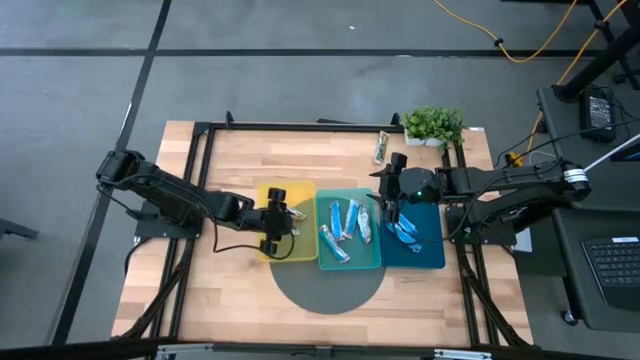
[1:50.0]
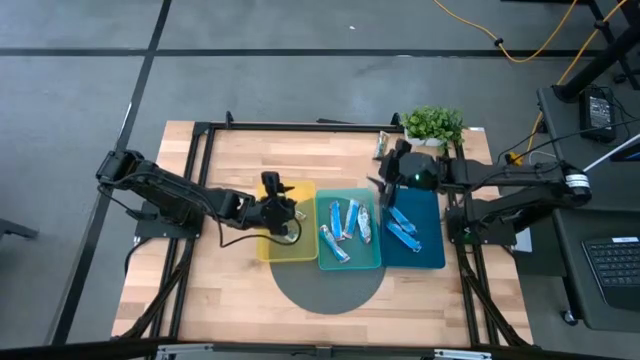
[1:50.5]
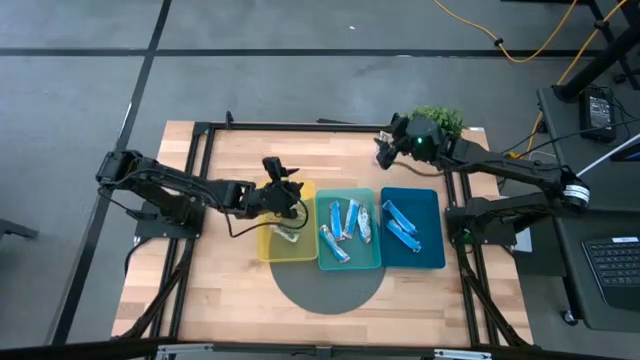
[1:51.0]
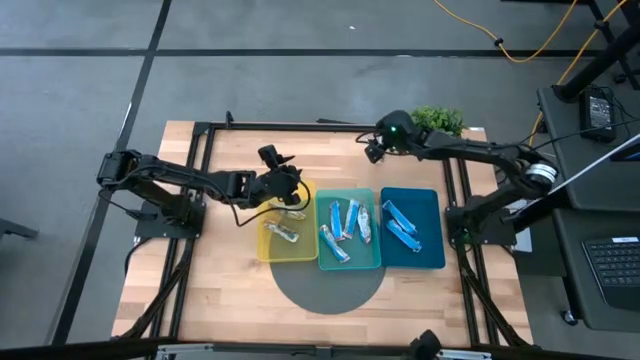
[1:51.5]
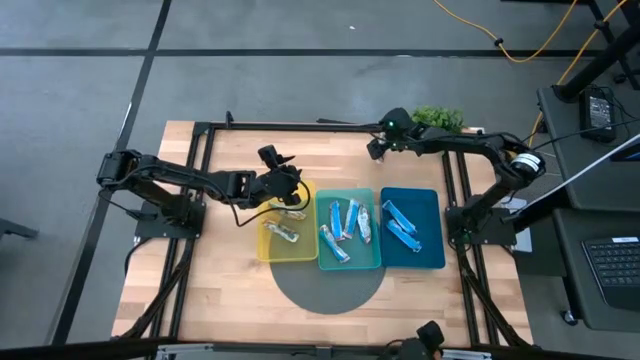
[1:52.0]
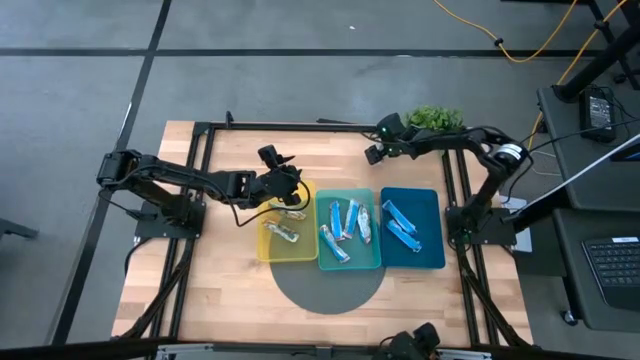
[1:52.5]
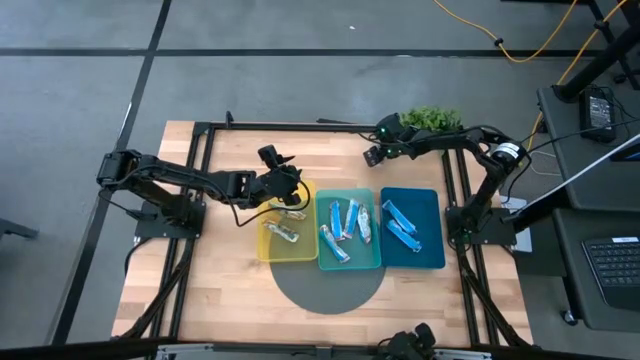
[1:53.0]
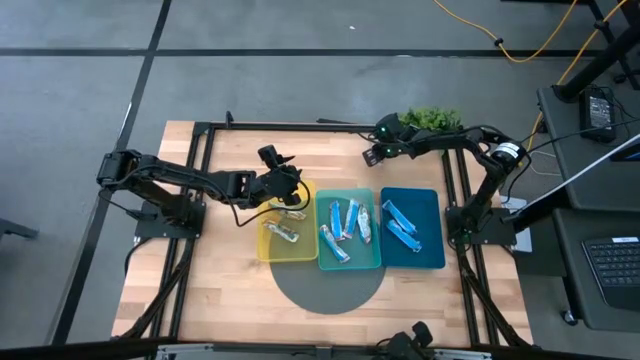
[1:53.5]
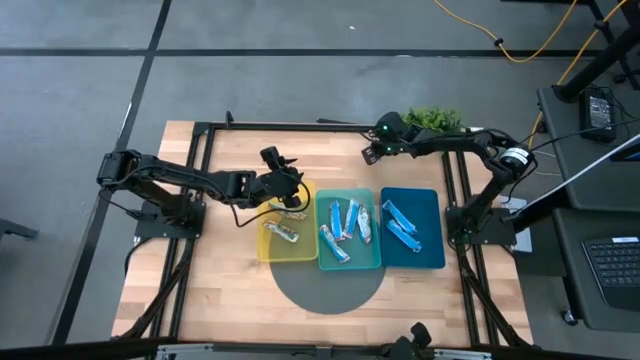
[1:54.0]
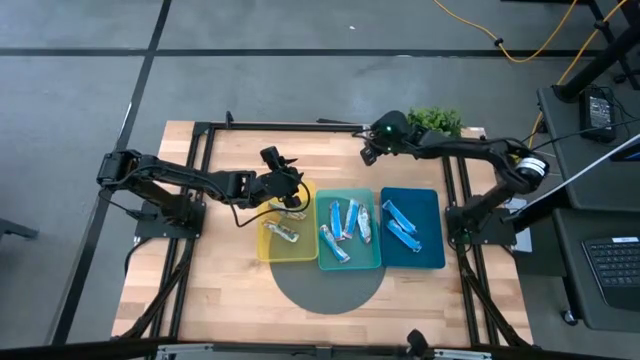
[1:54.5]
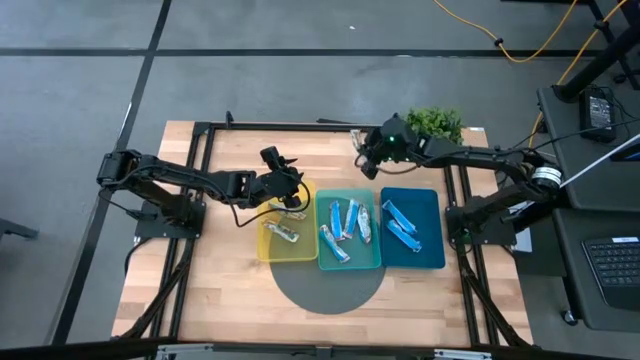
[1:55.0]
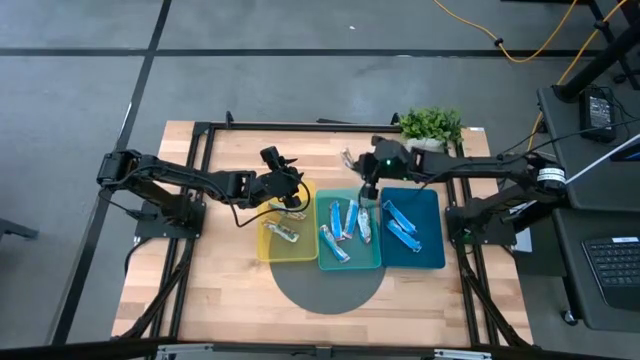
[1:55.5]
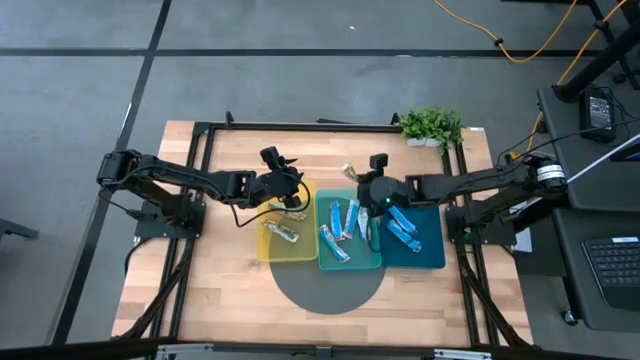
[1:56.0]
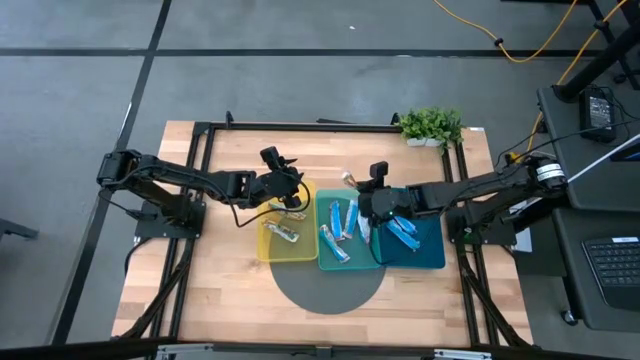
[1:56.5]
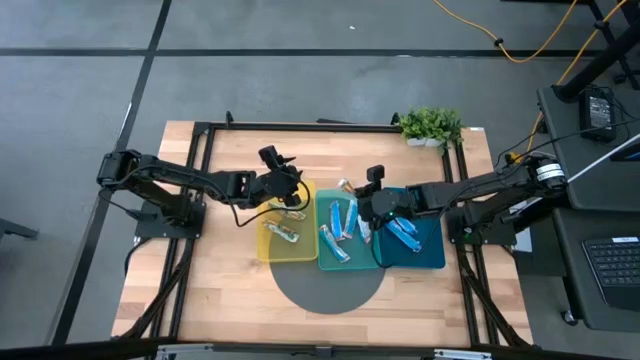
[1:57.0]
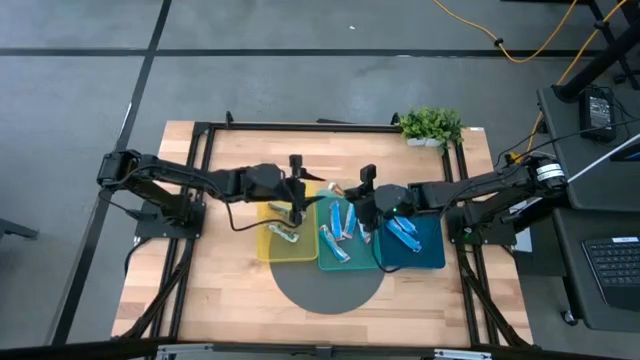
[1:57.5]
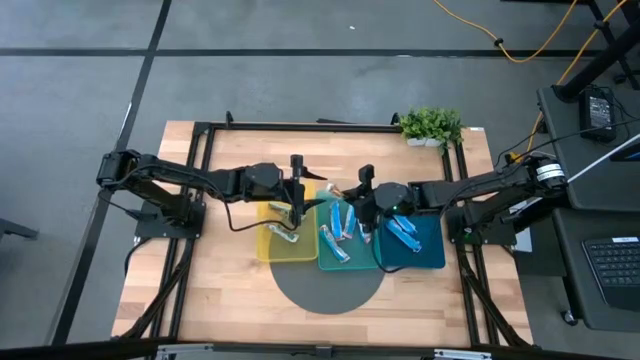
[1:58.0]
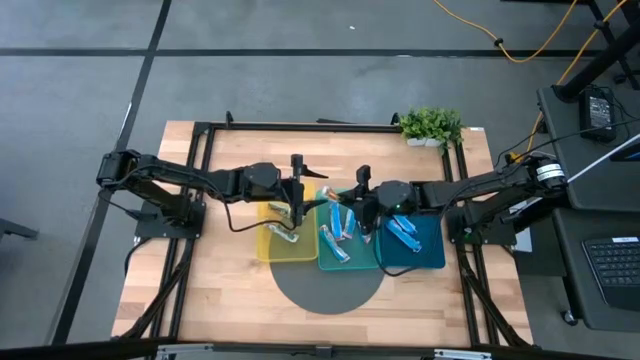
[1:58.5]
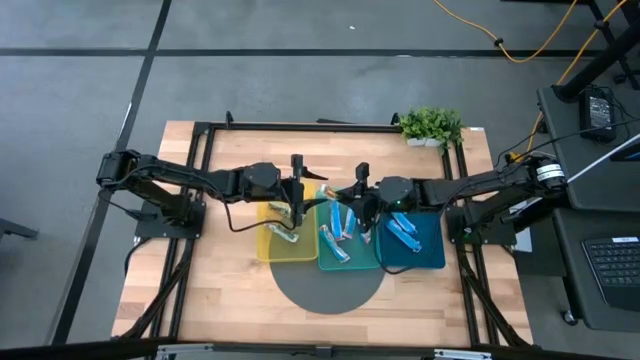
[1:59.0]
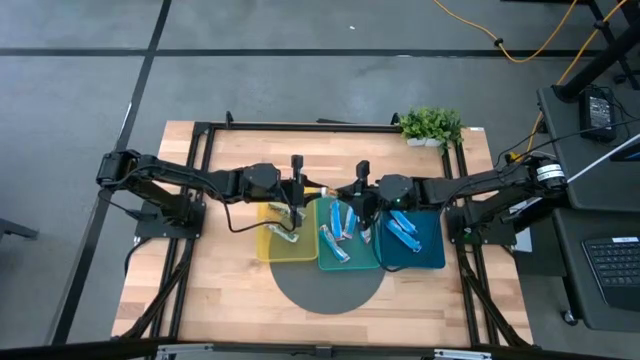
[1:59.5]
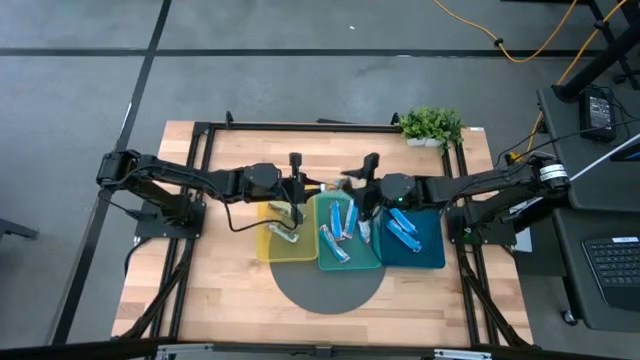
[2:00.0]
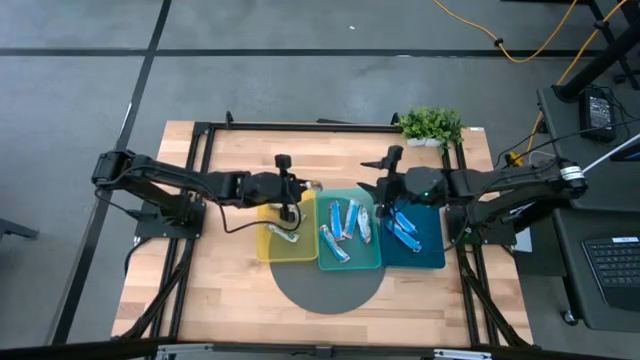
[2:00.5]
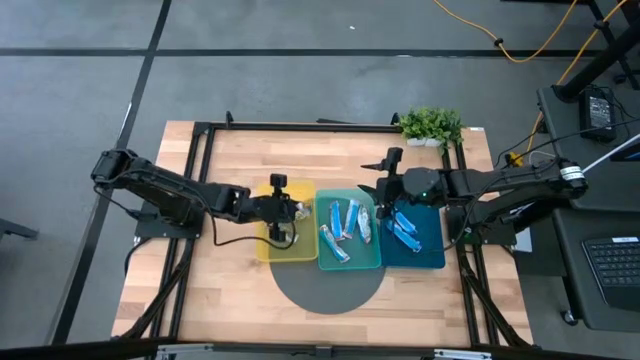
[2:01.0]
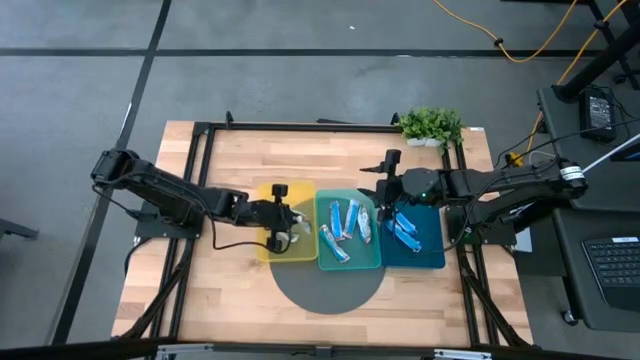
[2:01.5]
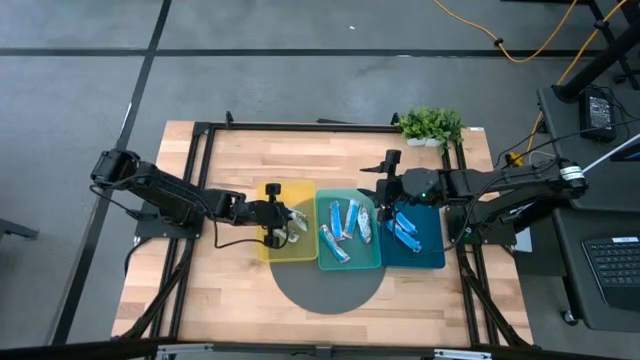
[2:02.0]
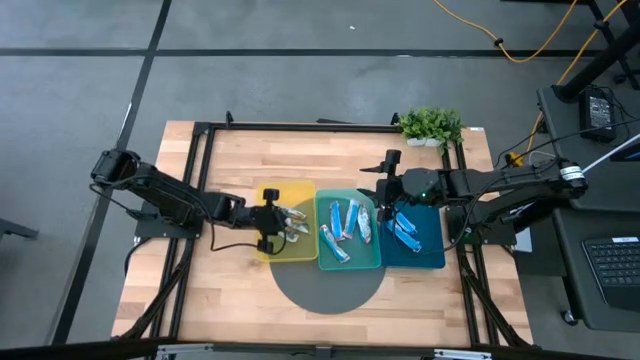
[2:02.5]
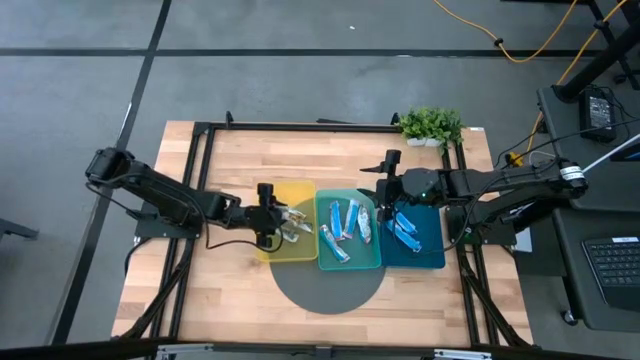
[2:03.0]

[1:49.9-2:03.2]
Task: Pick and place Granola Bars by type
Put the yellow granola bar into the yellow bin

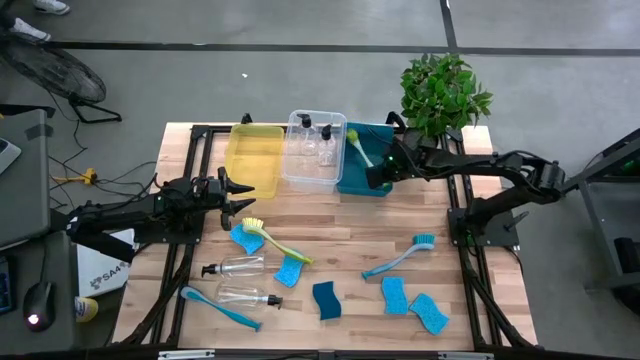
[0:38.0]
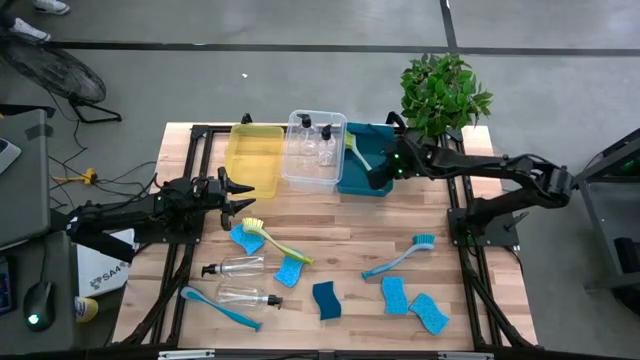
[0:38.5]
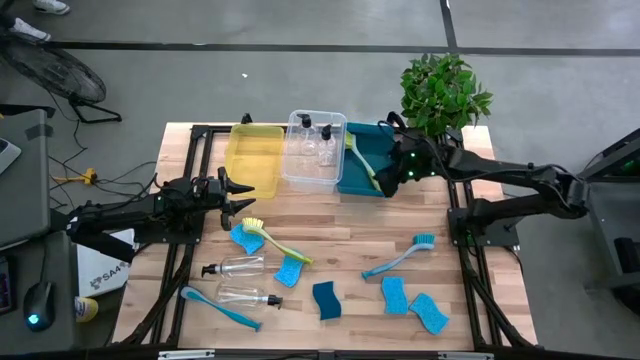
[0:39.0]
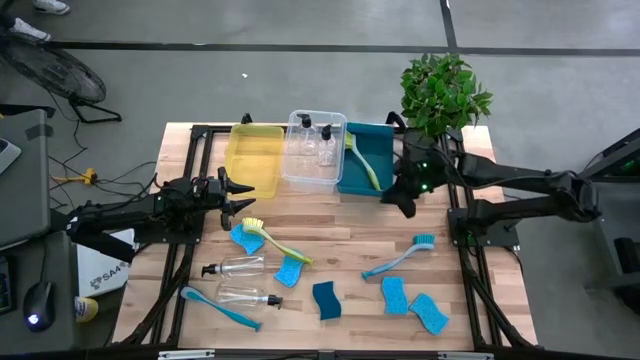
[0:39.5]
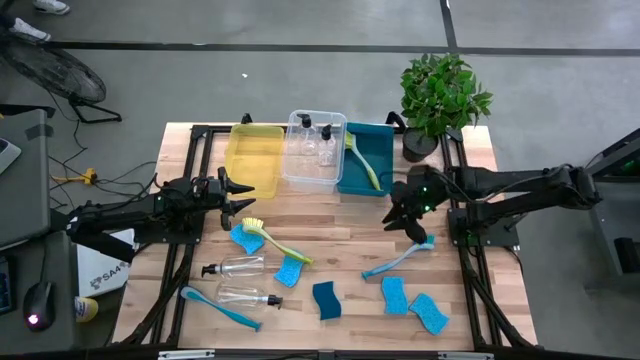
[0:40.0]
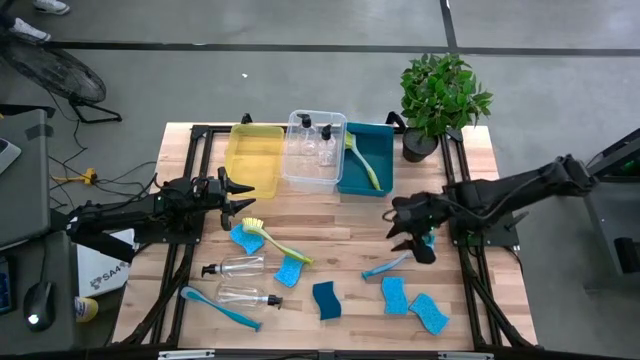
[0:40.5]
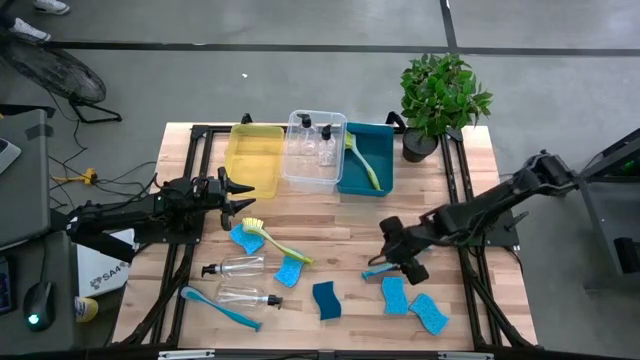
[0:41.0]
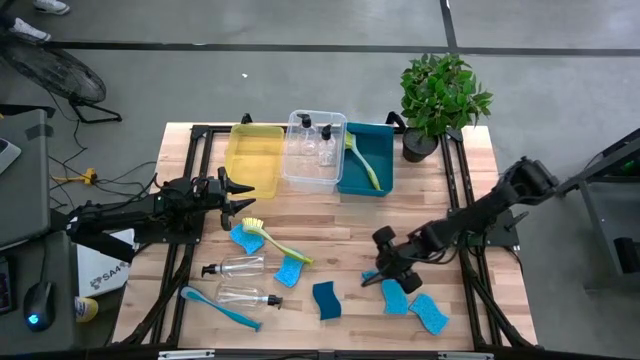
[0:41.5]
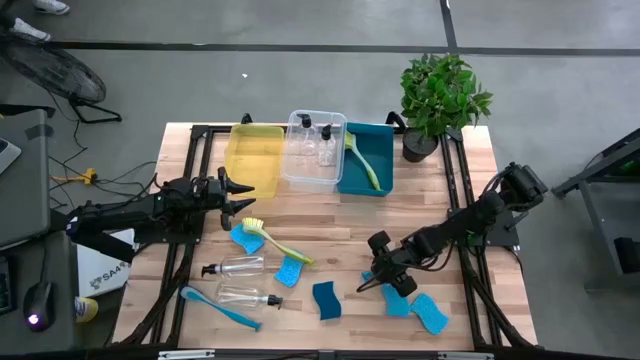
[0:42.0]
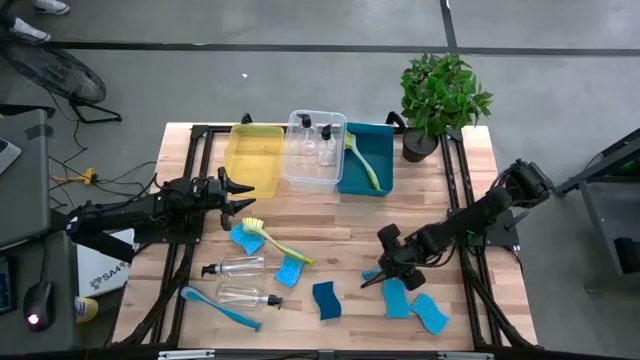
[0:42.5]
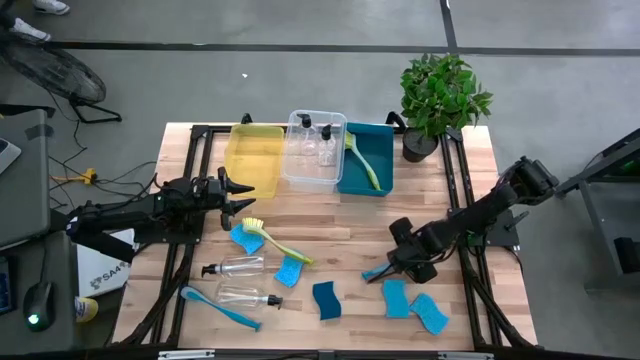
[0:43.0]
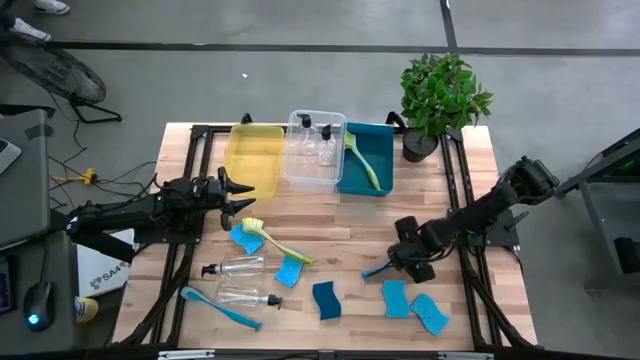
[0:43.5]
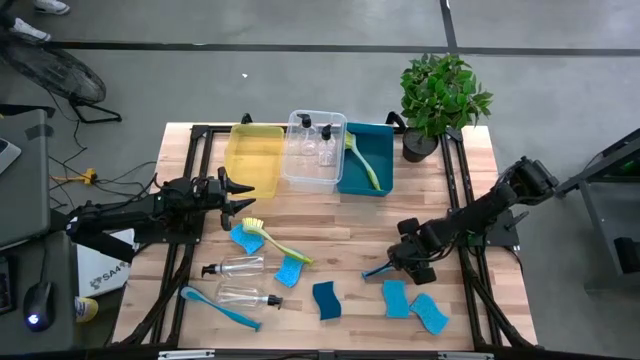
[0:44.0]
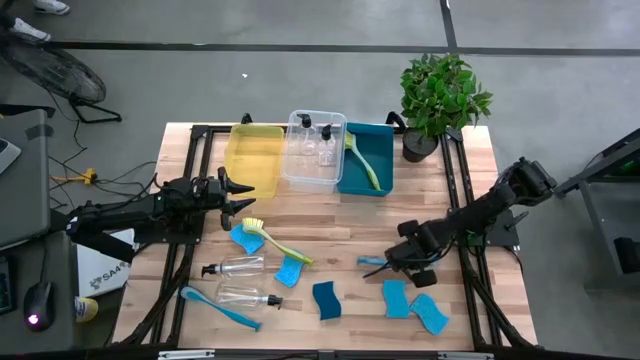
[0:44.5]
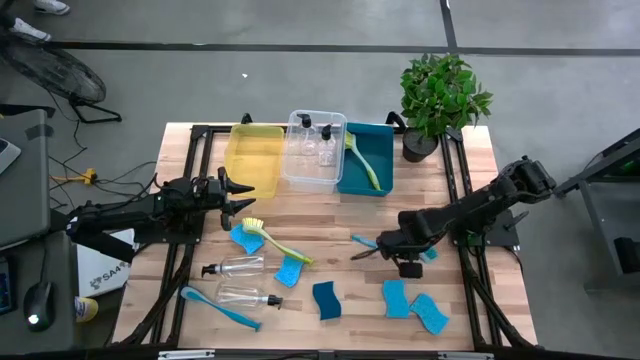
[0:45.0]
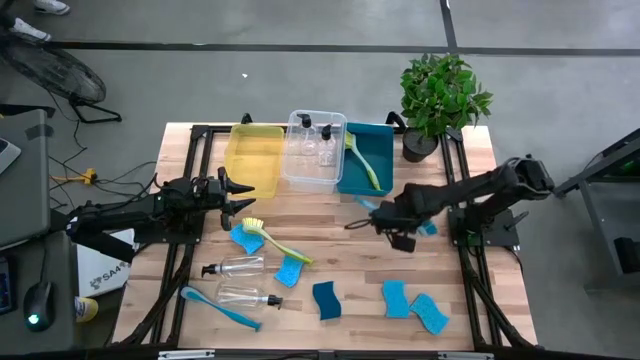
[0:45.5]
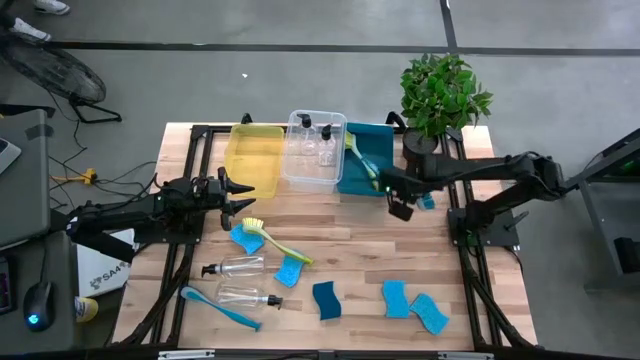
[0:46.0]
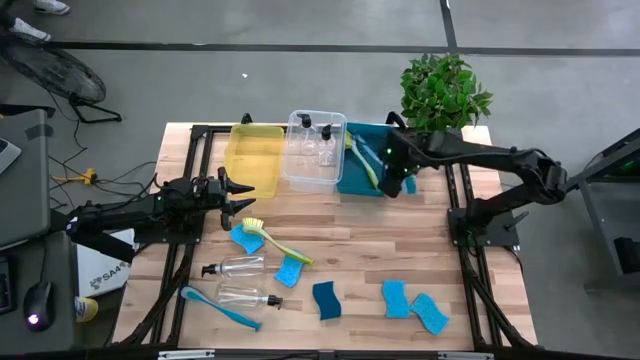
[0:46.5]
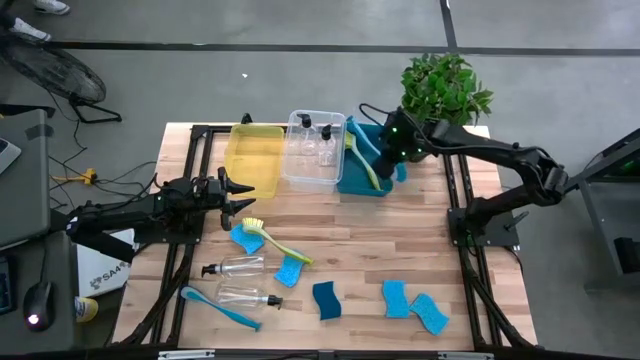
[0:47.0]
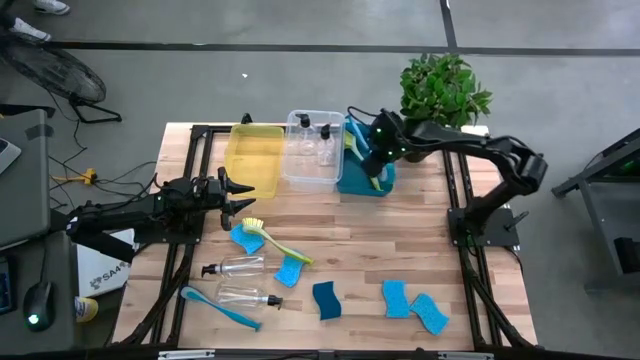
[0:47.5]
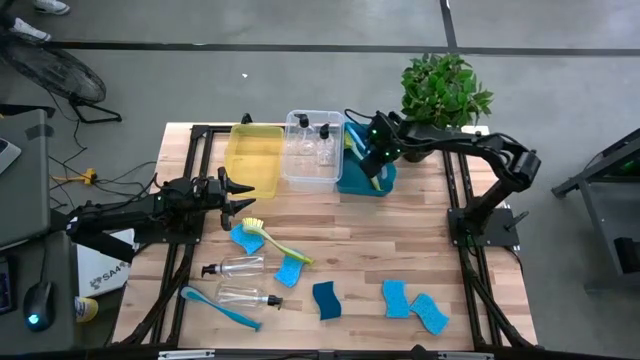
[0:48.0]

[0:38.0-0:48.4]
Task: Pick & Place Kitchen Sink Supplies
Put the blue dish brush into the blue bin
